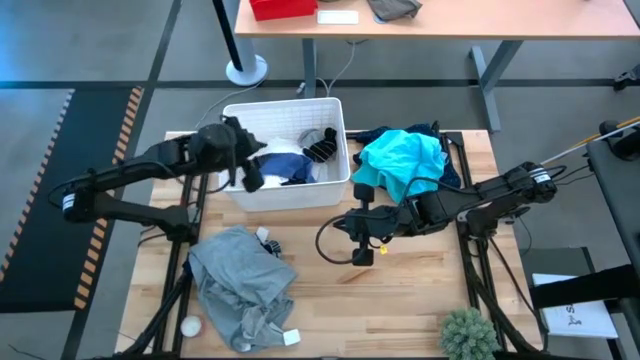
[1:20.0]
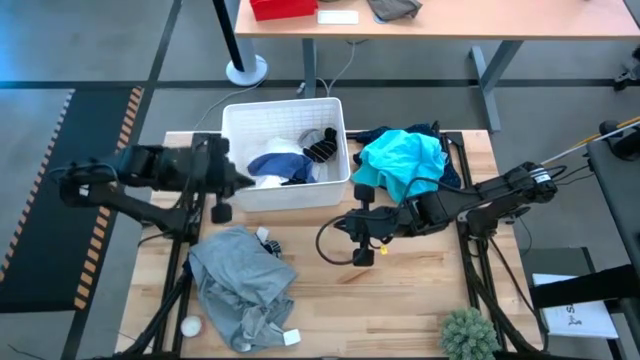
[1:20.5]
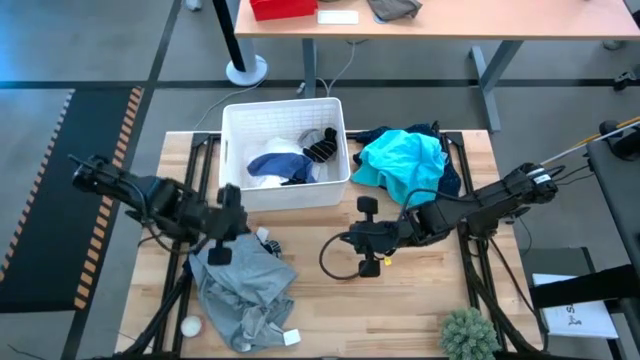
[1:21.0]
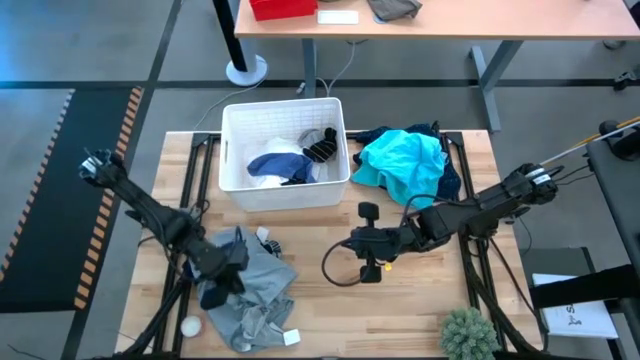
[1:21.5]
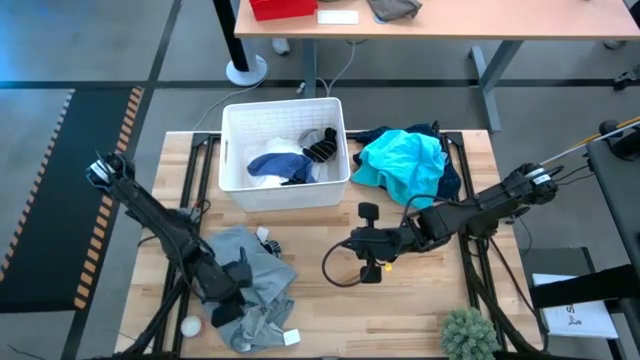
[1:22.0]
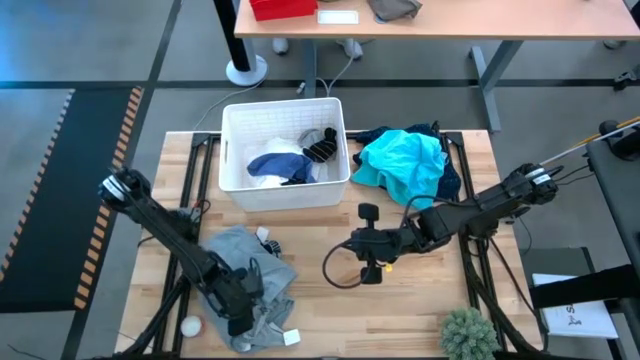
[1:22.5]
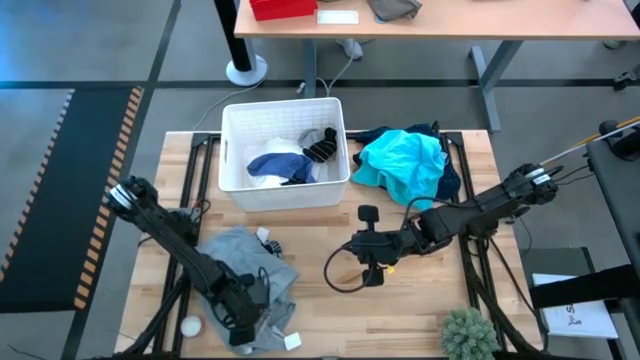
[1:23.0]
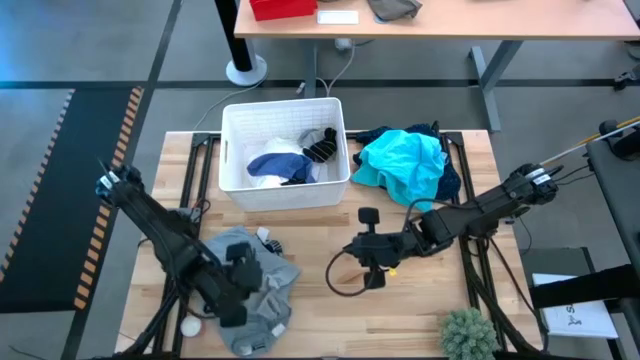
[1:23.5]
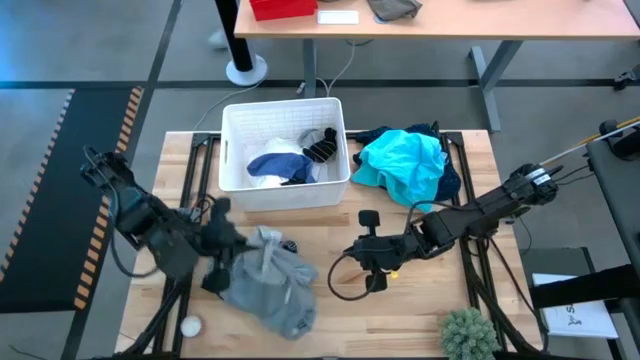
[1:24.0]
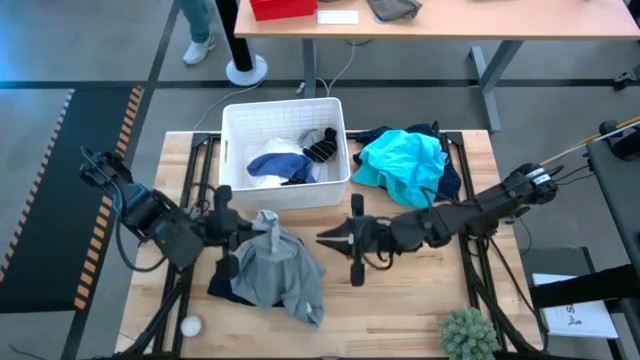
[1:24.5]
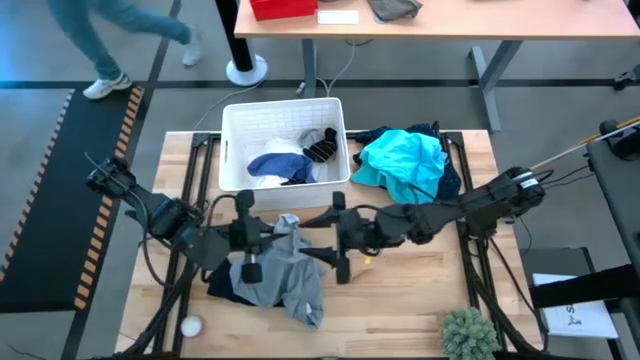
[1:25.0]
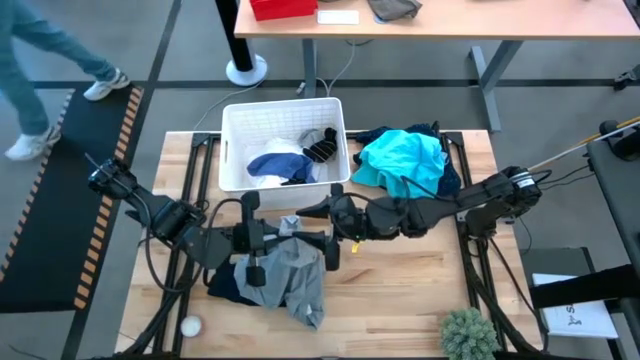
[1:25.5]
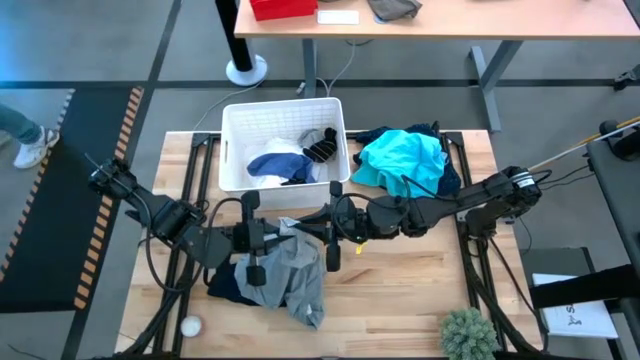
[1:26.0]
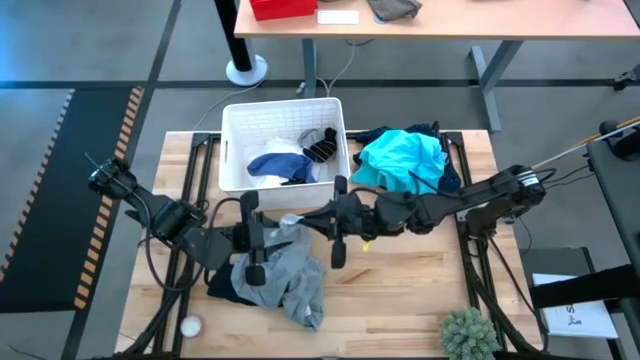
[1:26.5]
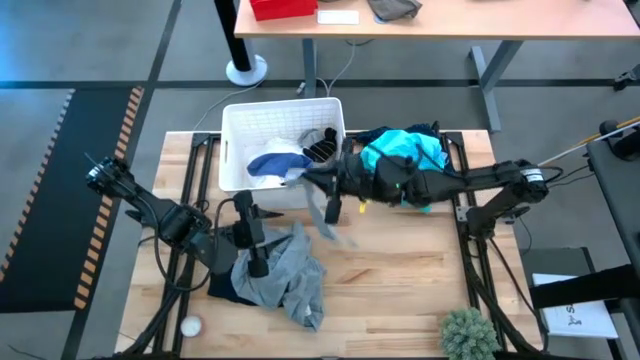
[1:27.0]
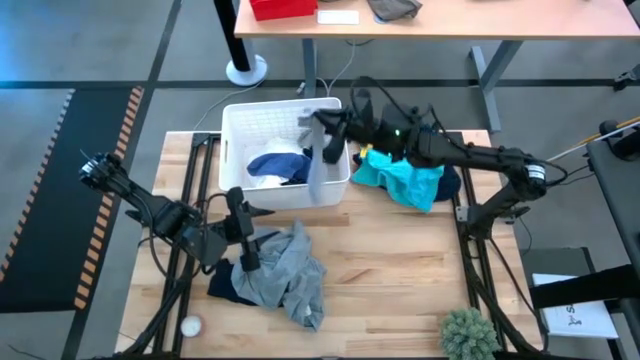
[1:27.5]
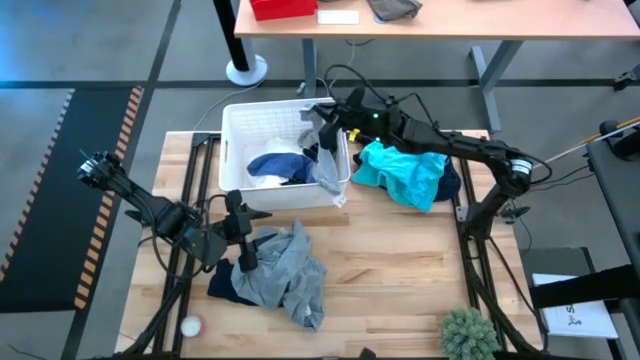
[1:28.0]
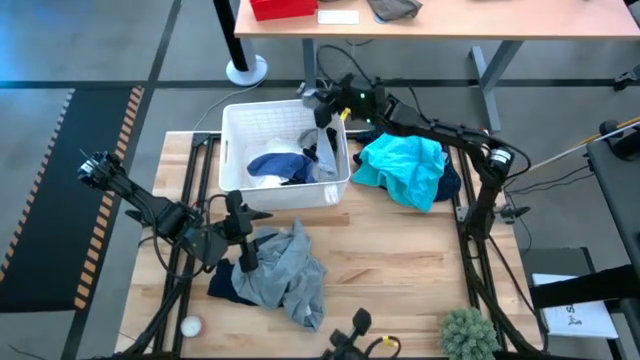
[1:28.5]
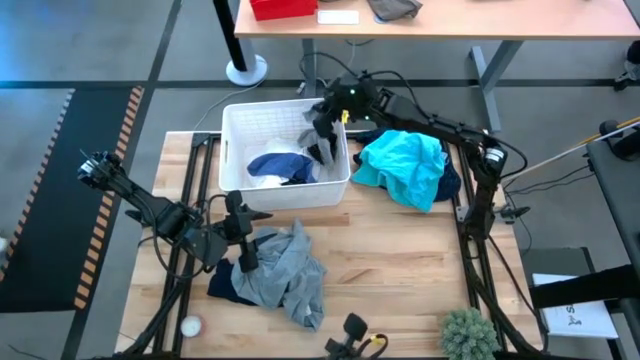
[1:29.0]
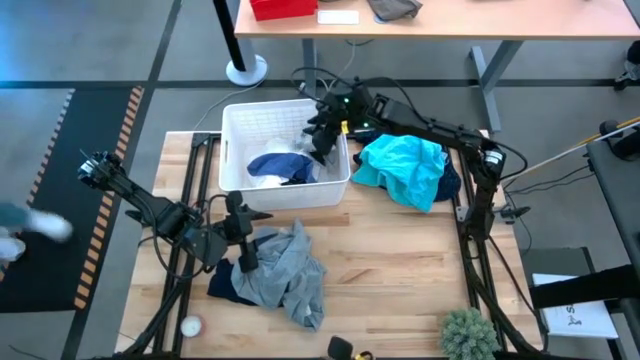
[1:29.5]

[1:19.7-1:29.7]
Task: Sort clothes
Put the gray sock into the white bin

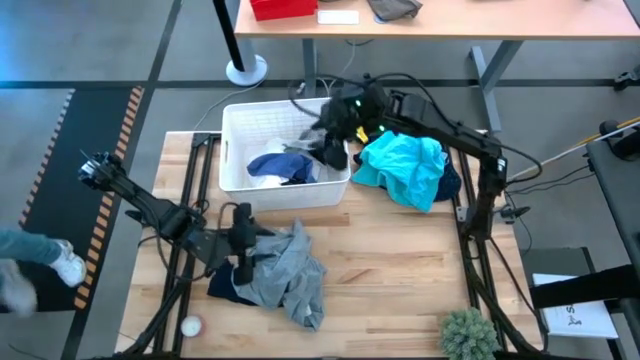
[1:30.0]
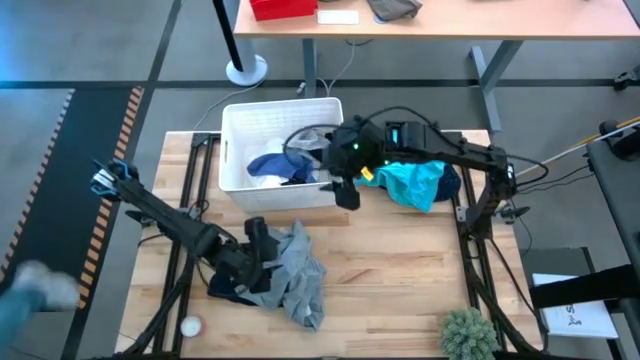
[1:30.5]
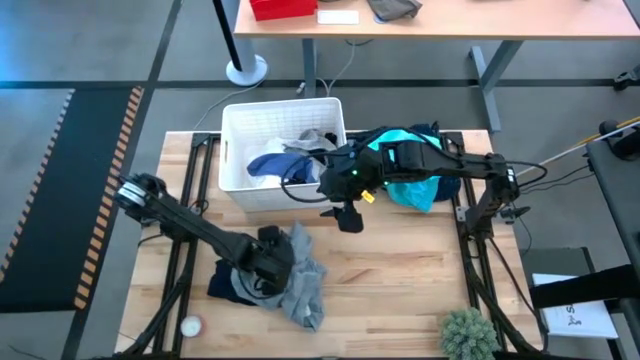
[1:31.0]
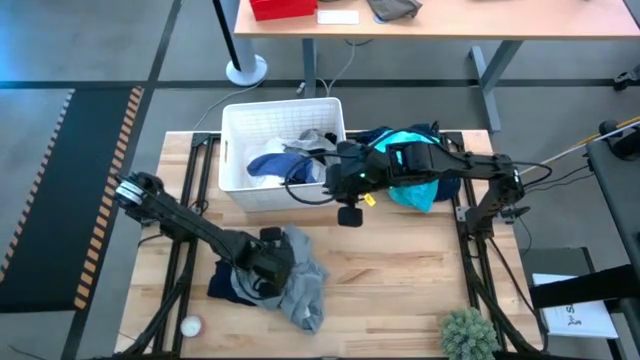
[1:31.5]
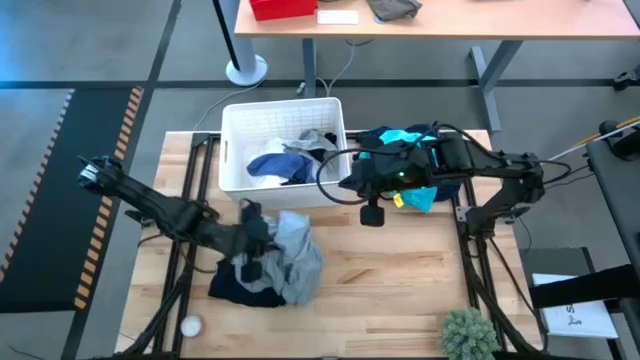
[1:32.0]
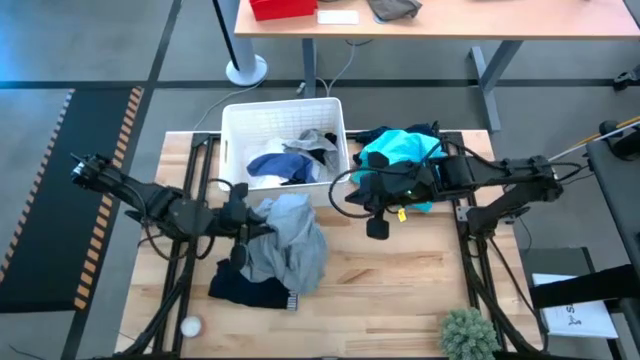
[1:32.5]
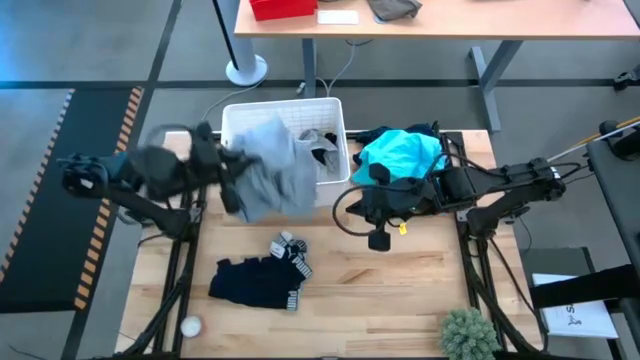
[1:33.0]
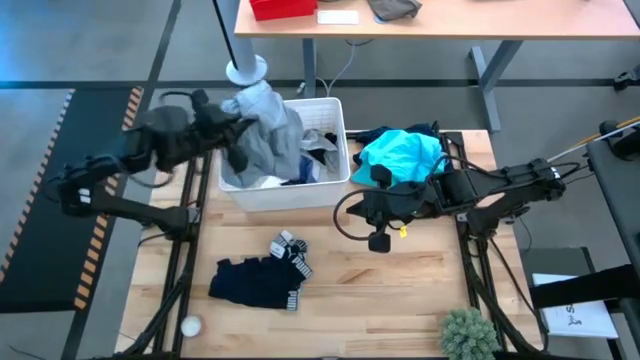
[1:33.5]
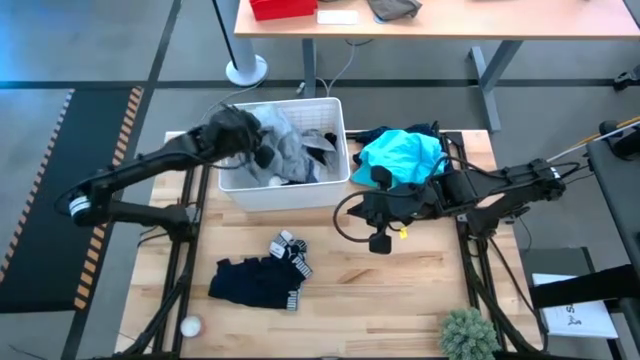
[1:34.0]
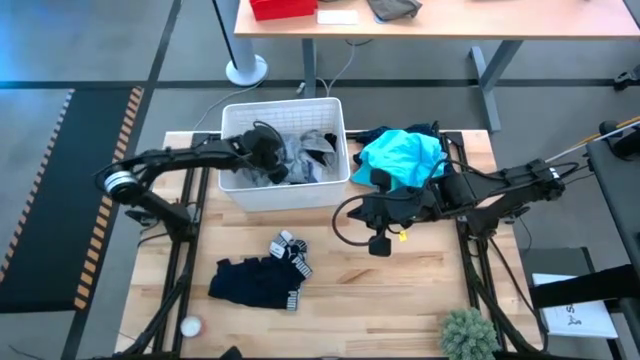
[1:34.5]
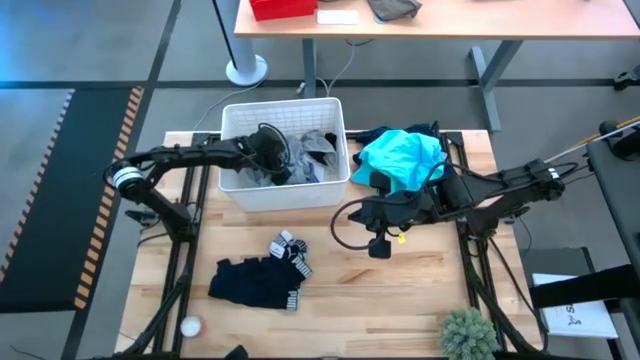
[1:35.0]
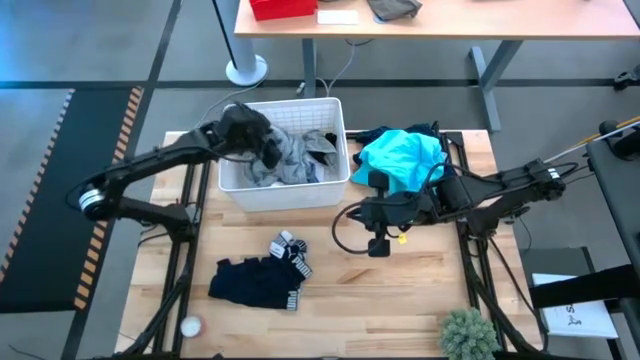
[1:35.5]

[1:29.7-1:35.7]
Put the gray shirt into the white bin

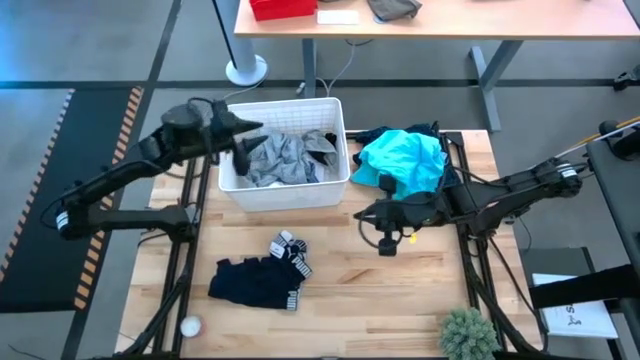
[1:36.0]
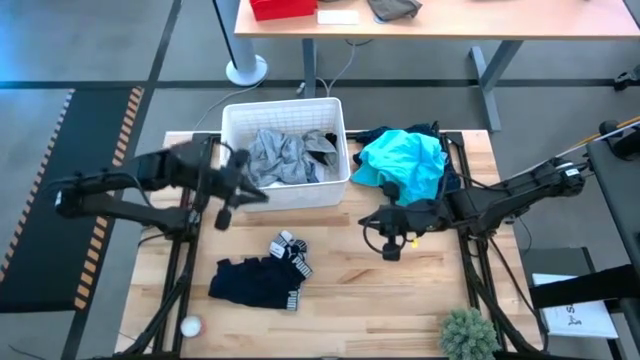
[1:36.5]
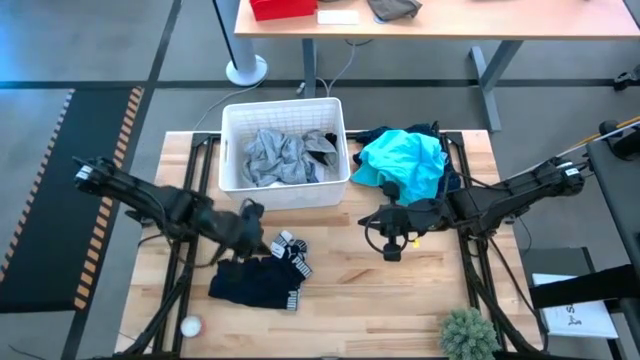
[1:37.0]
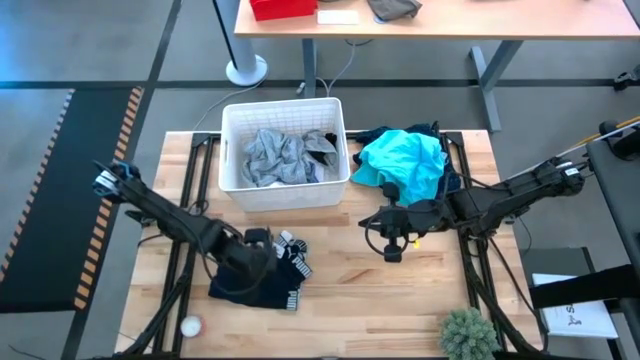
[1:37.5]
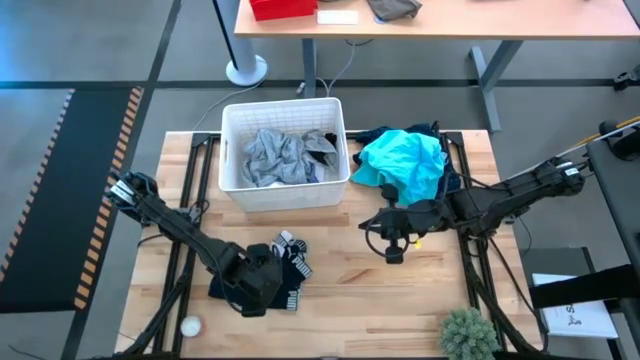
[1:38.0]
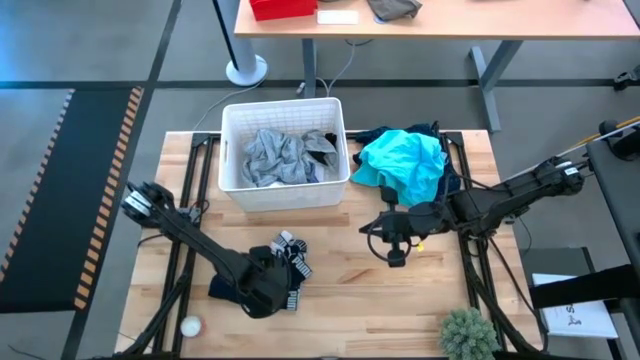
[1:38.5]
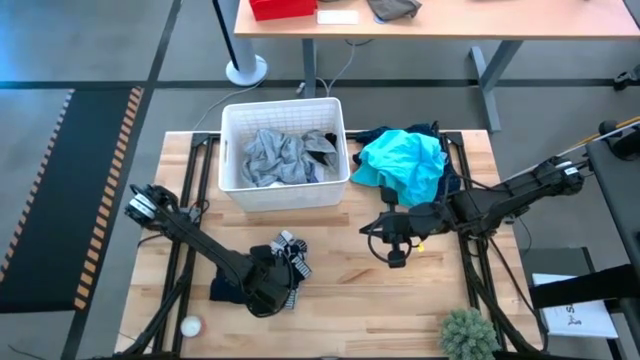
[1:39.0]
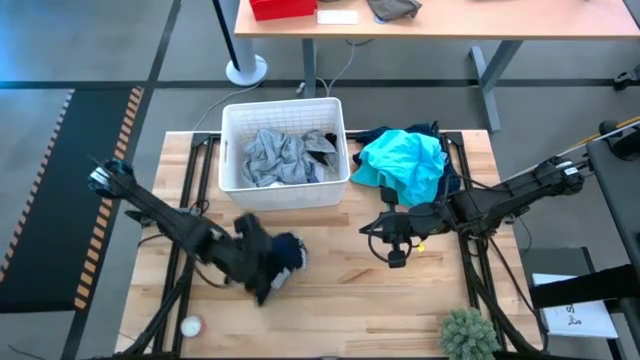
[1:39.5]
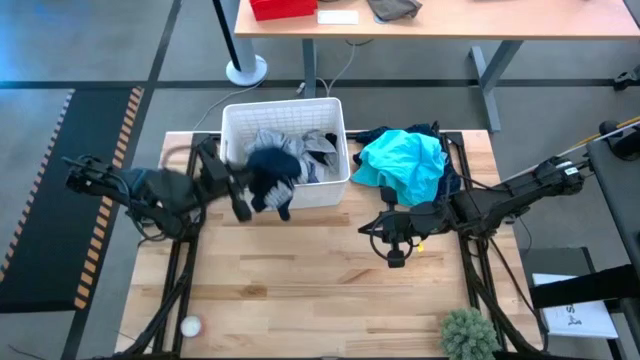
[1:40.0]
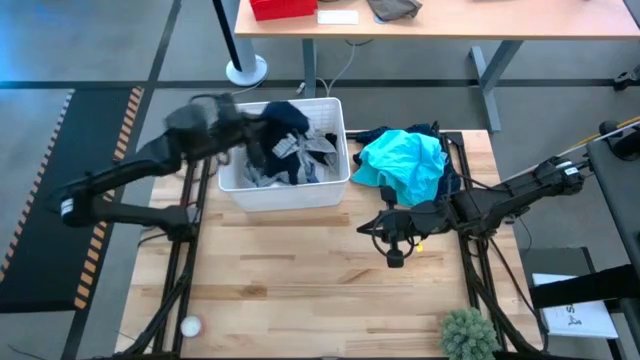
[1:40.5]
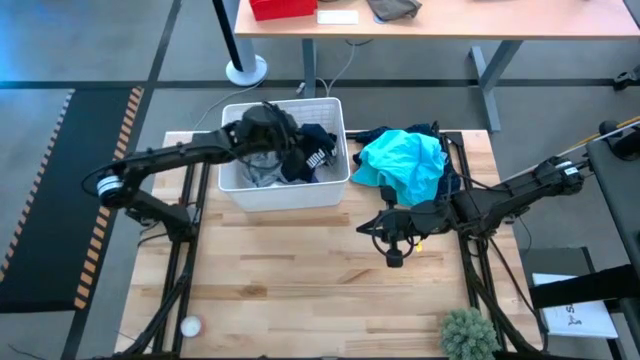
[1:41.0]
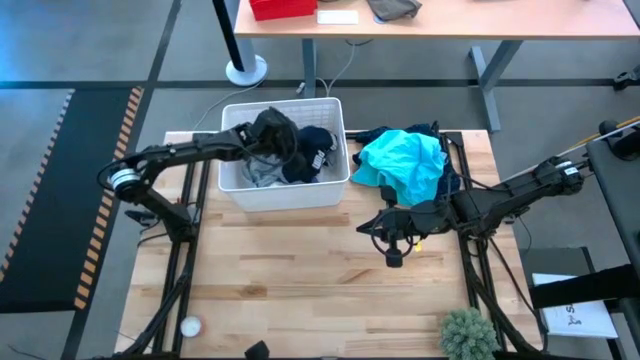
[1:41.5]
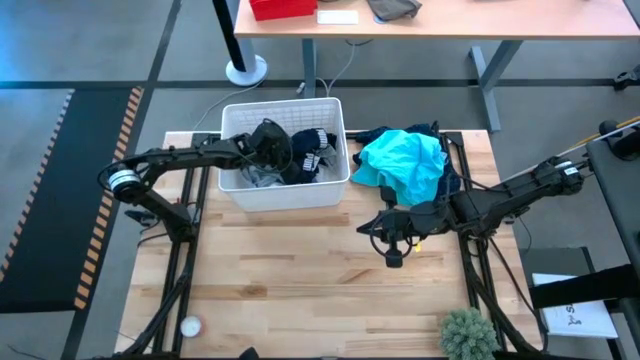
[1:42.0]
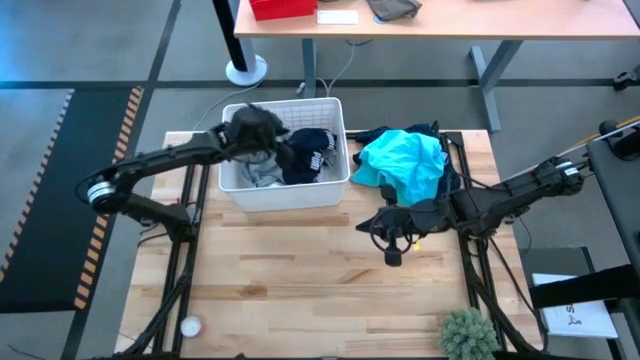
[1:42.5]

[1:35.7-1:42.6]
Put the blue underwear into the white bin
